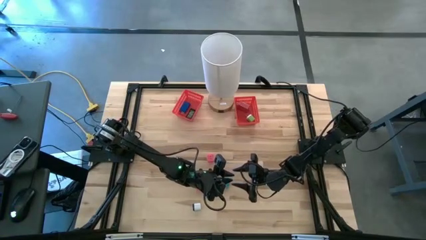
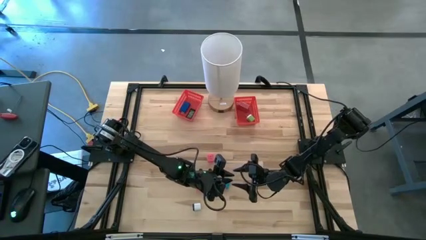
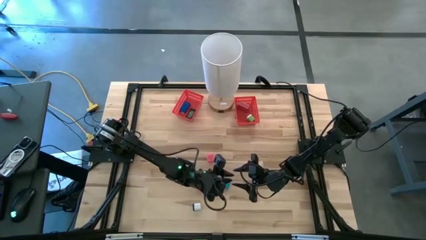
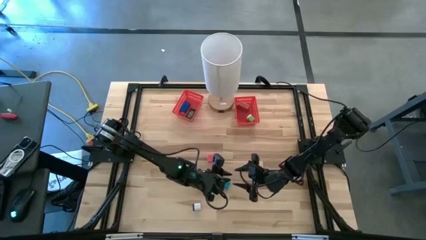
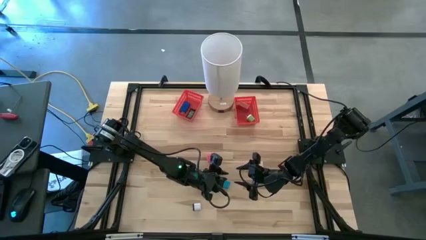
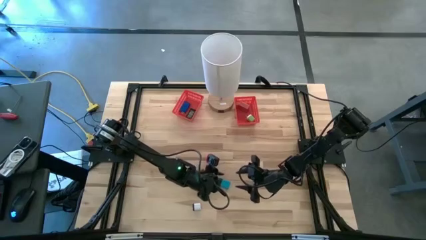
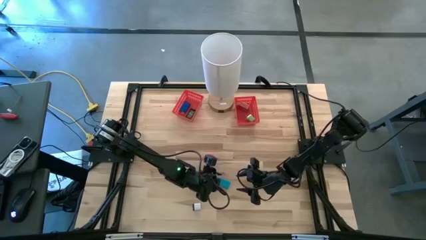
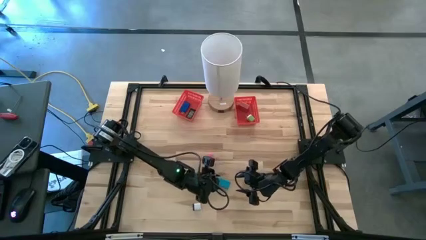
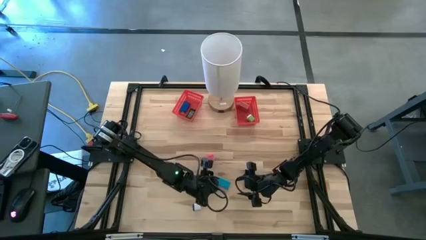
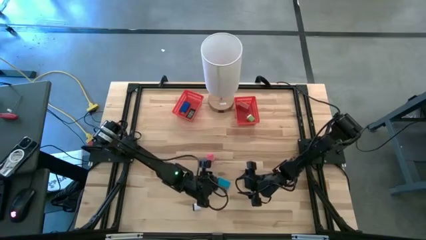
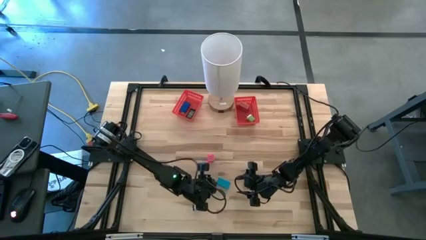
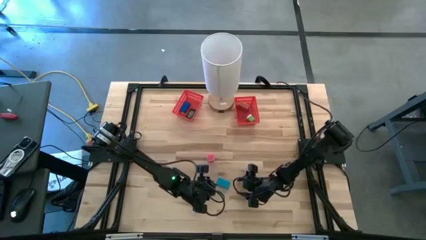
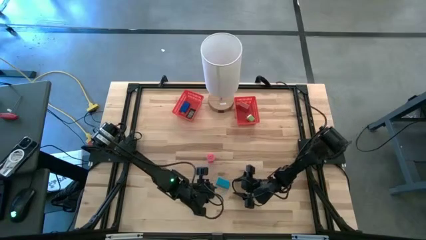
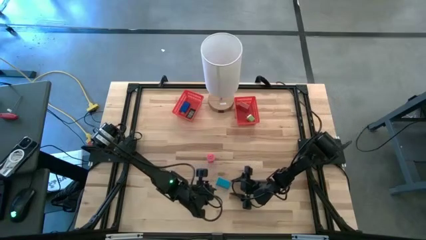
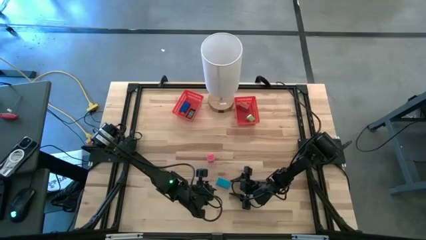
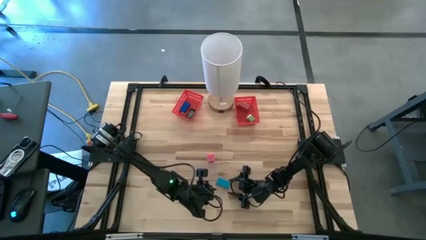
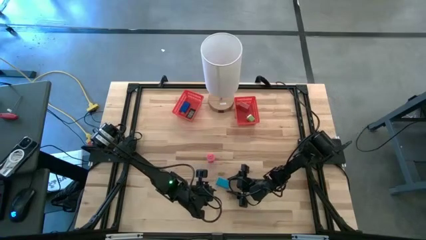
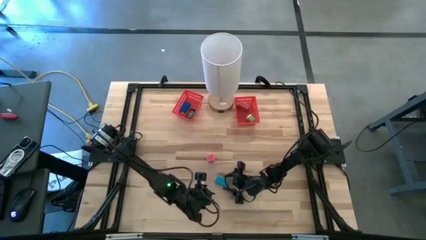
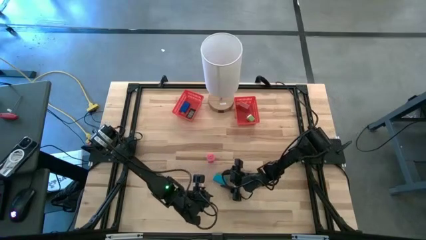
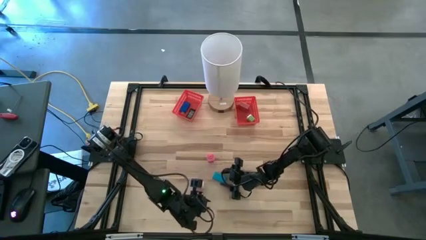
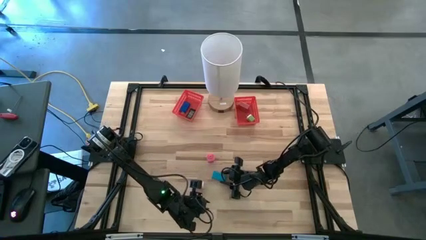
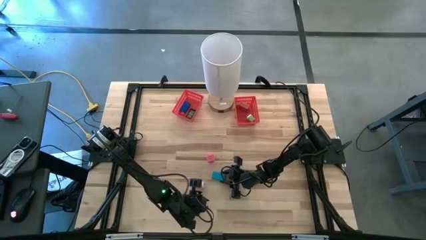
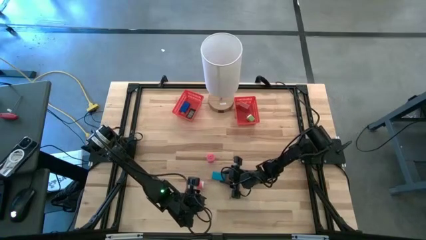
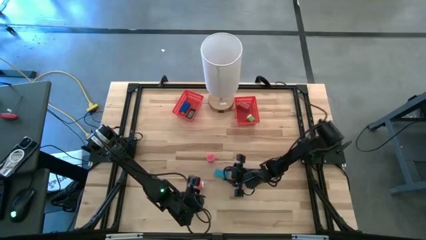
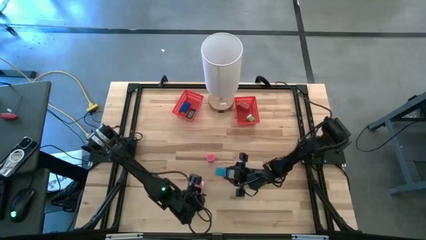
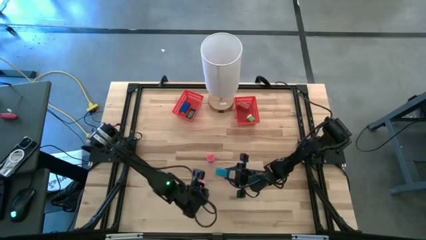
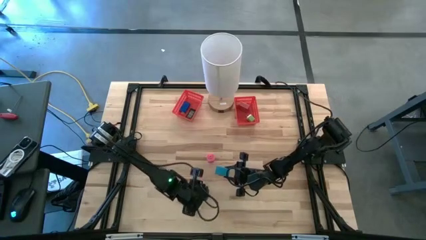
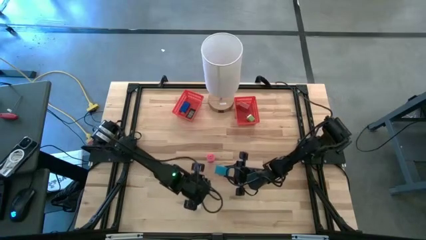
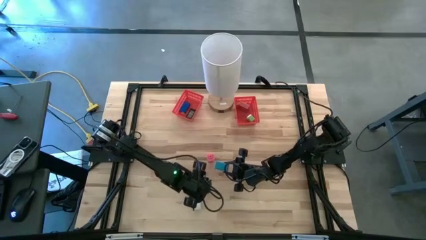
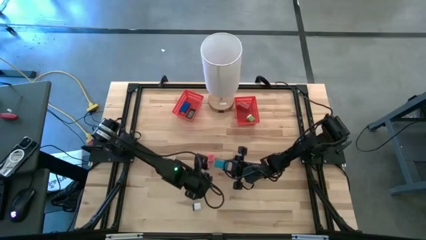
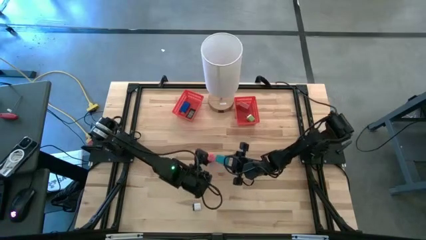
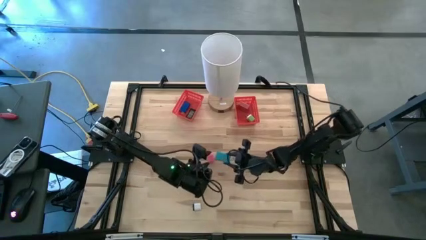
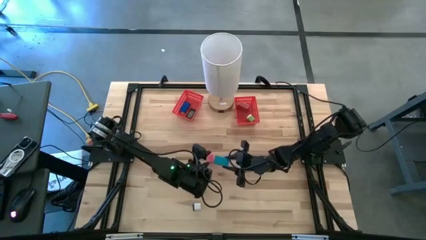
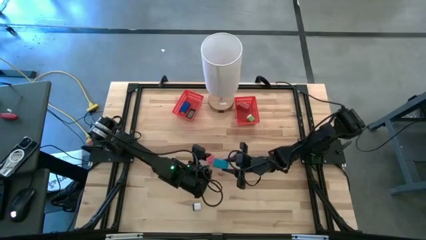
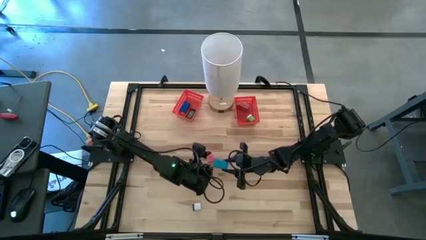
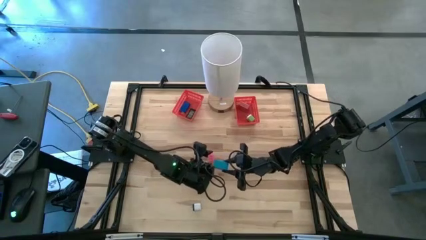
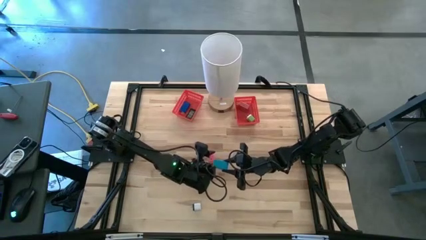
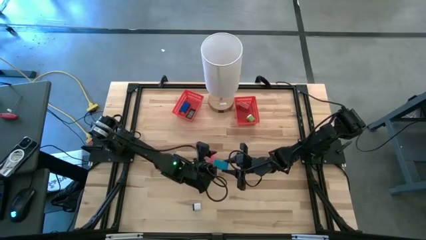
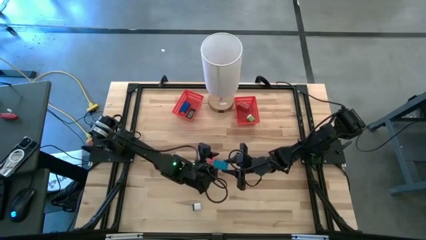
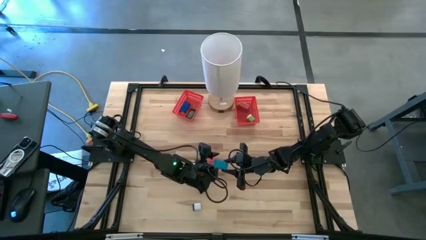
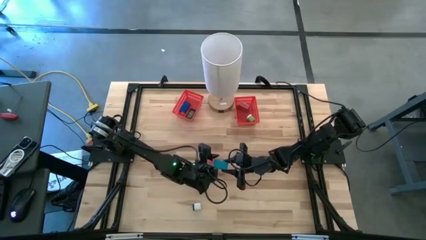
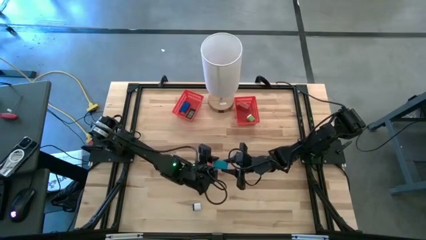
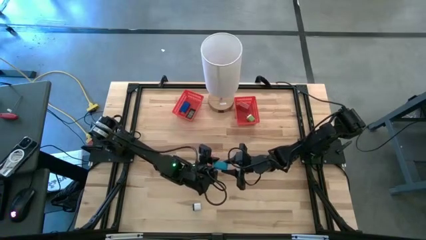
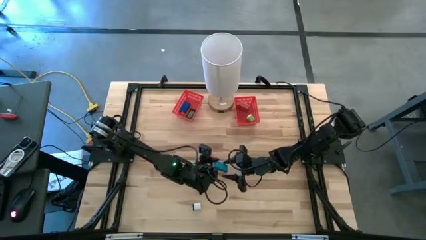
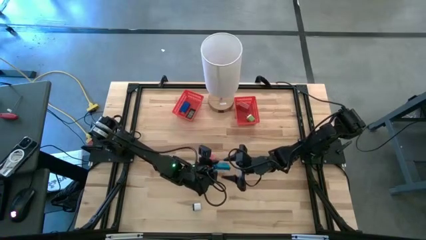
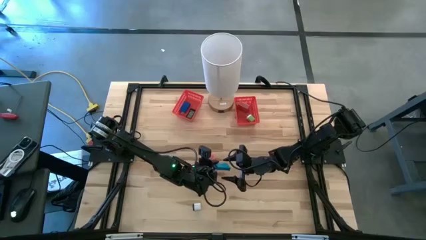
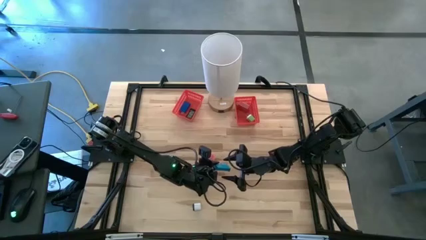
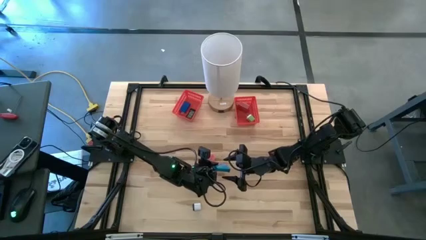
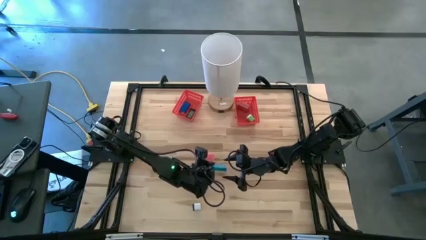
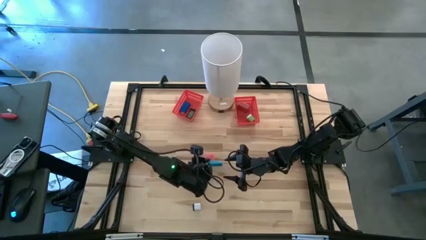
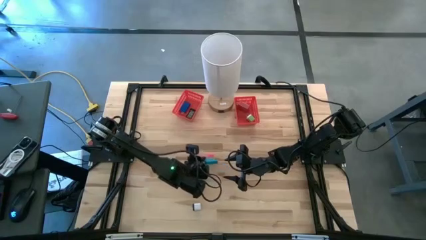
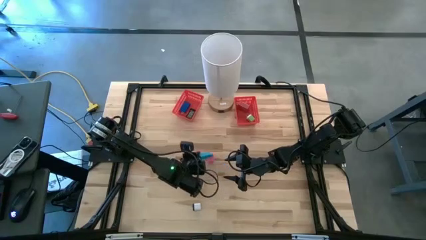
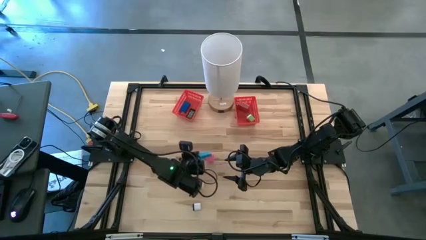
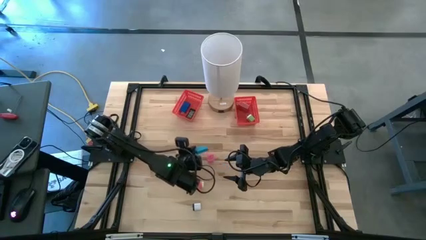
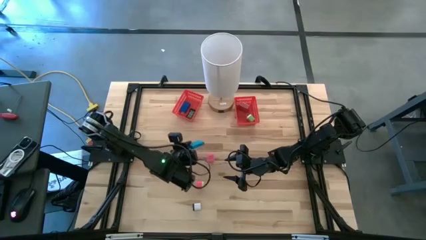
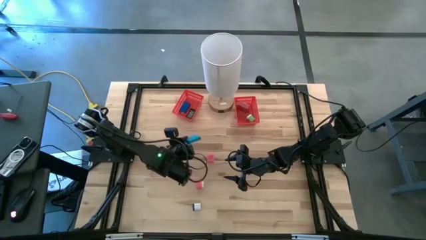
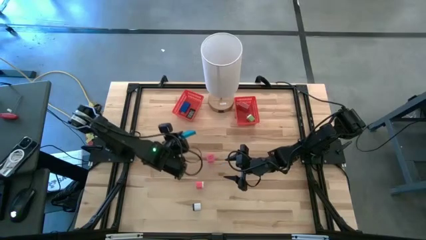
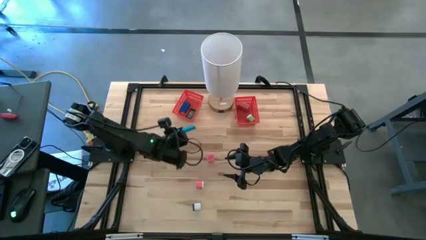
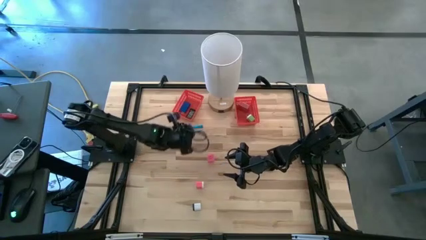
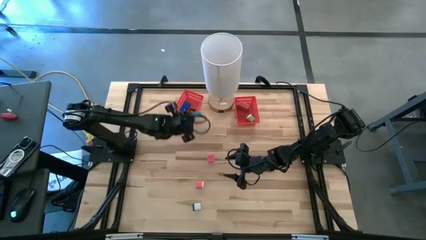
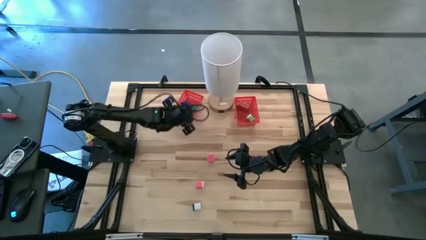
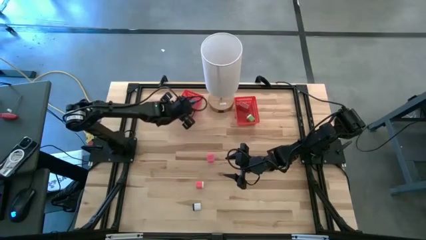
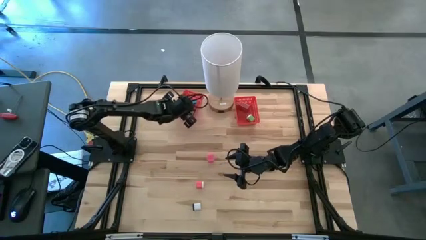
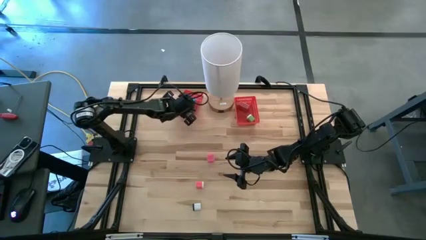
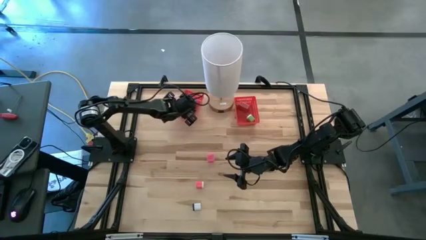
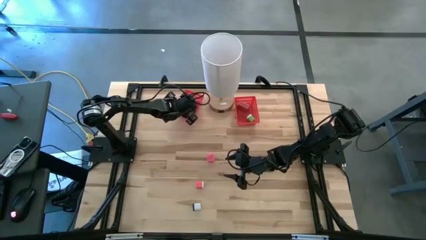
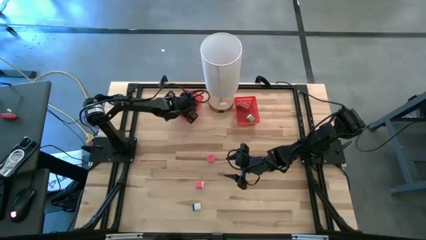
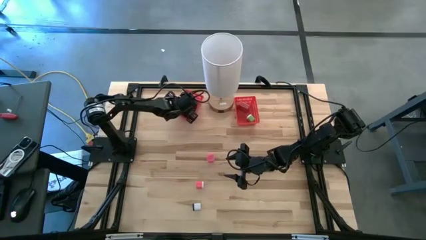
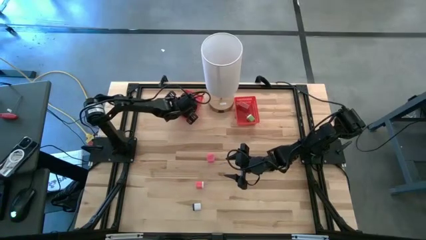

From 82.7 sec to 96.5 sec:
Task: Sort adapters and digital timers
Put the light blue digital timer into the left red bin

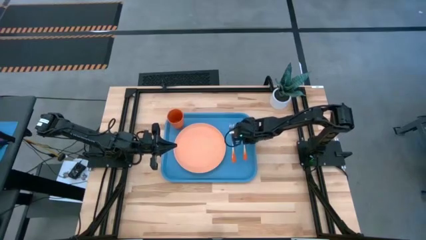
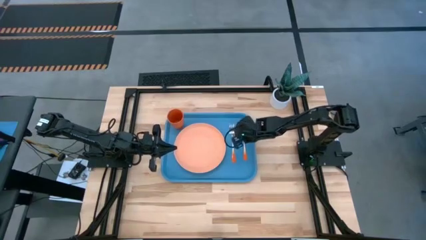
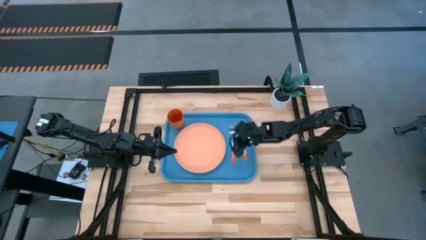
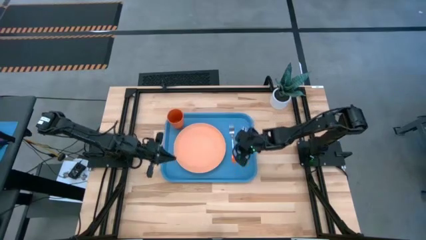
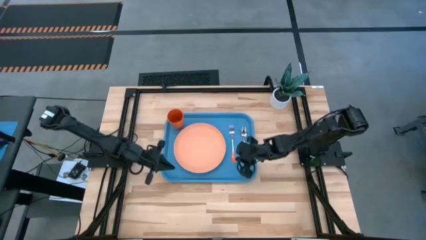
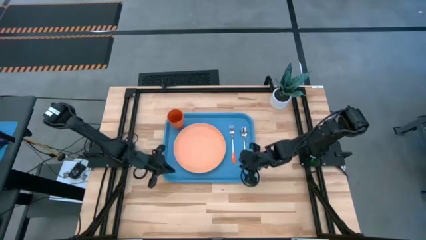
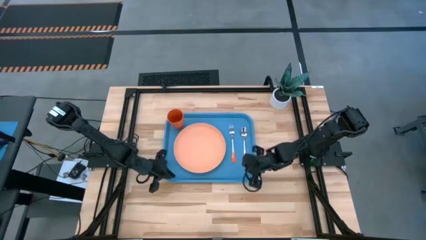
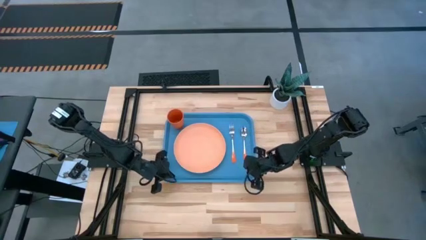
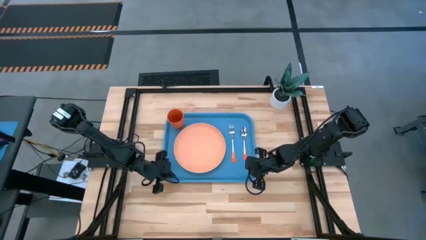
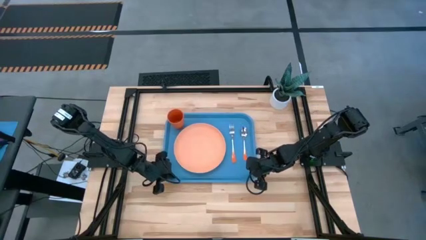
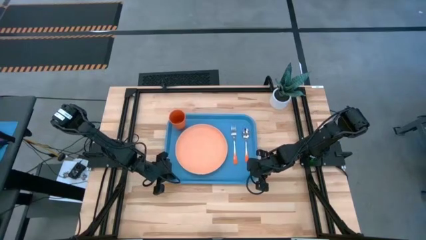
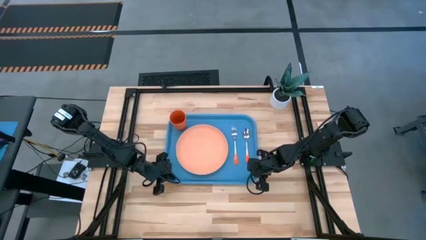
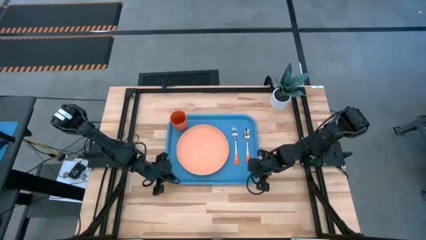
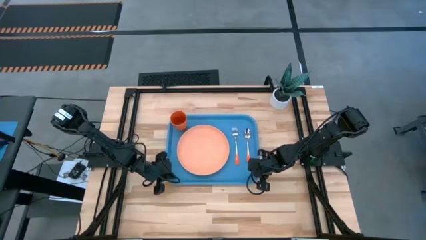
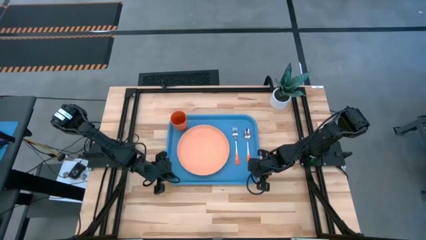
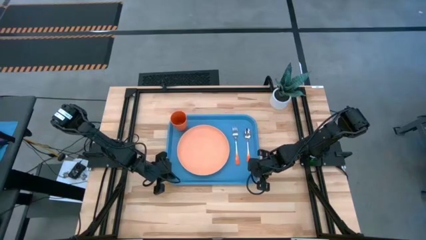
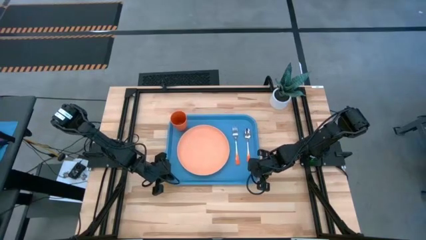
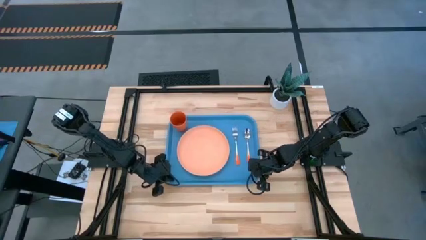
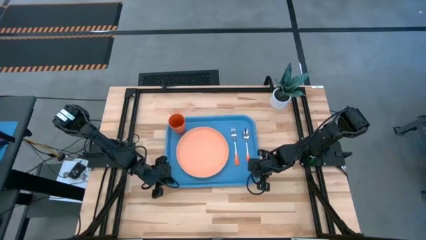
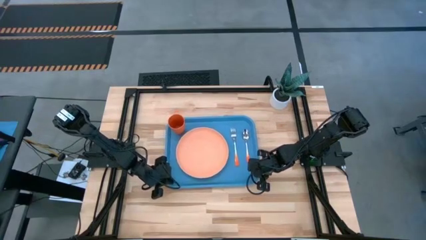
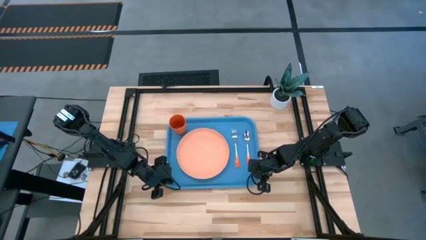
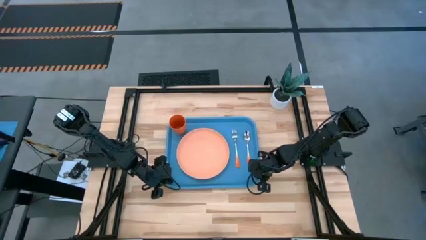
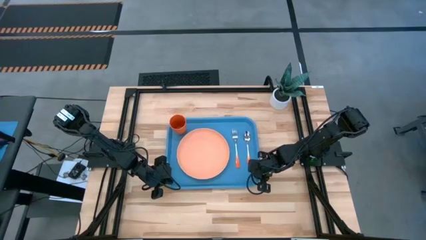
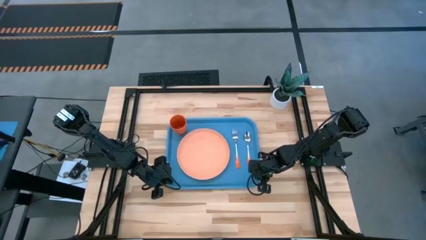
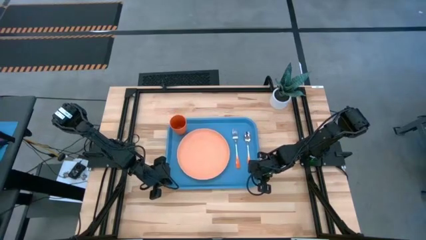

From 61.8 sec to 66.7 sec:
Task: Pick and place plate/cup/fork/spoon on tray
Adjust the blue tray on the table
